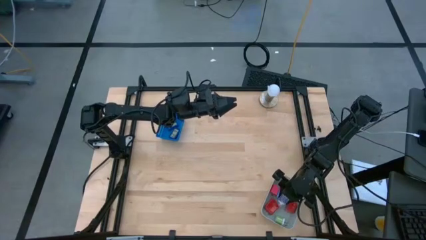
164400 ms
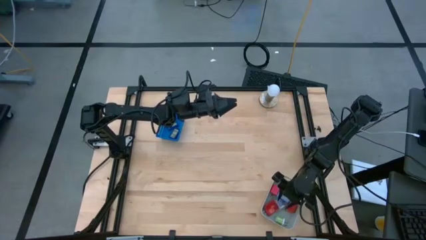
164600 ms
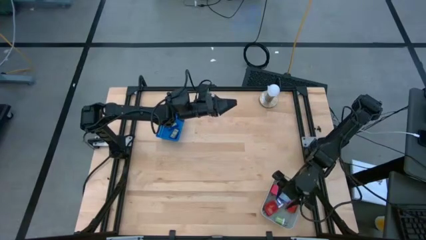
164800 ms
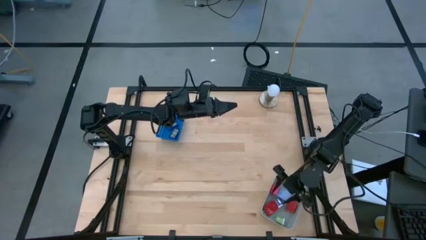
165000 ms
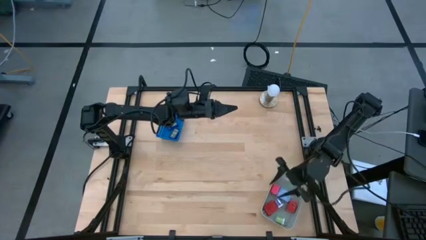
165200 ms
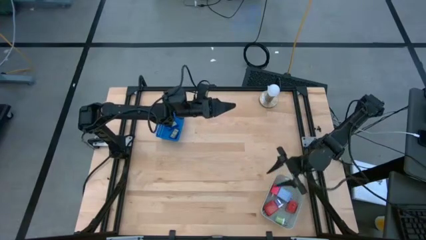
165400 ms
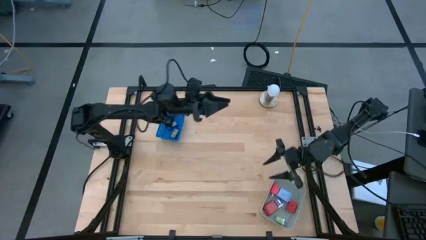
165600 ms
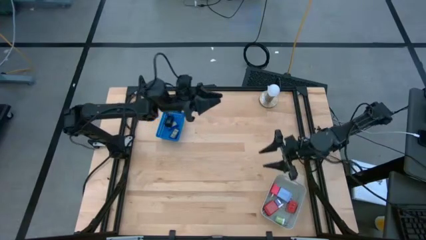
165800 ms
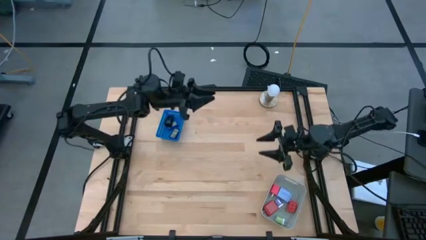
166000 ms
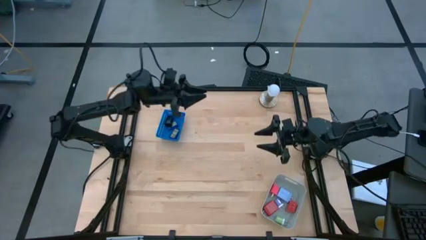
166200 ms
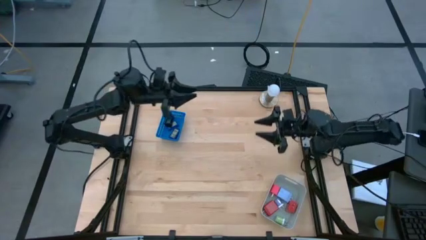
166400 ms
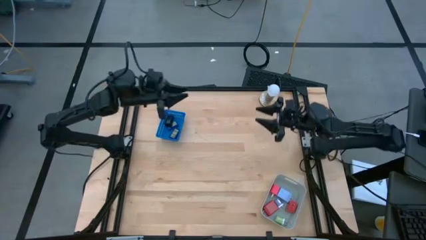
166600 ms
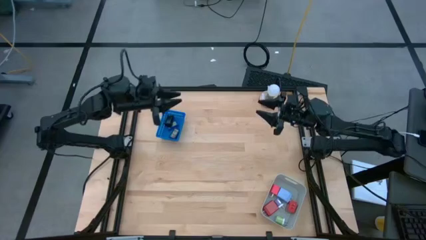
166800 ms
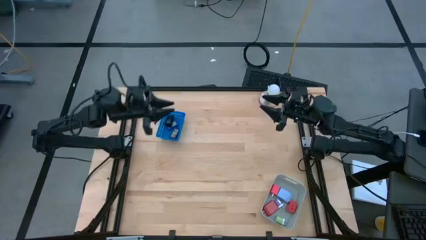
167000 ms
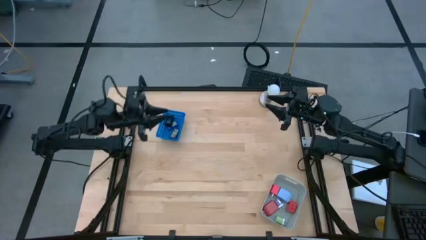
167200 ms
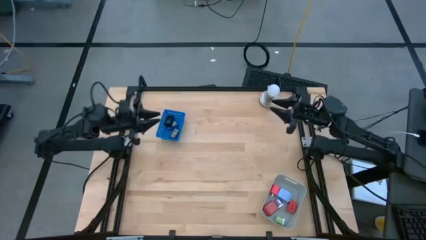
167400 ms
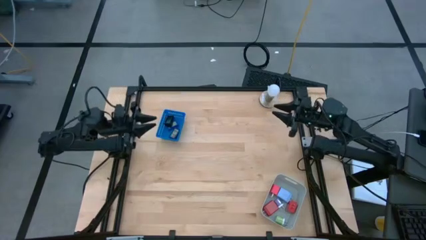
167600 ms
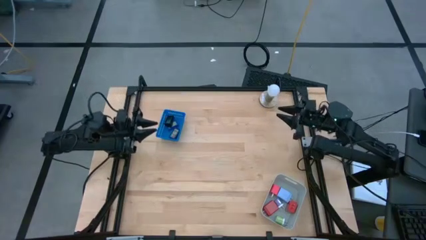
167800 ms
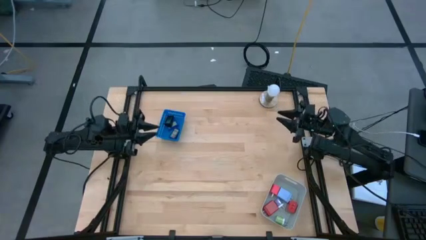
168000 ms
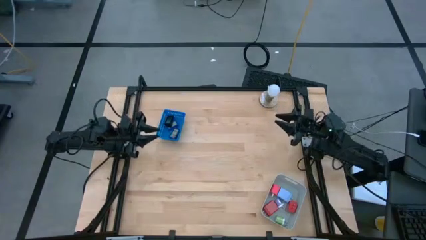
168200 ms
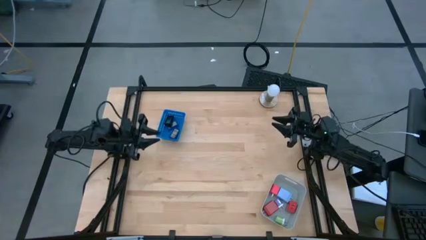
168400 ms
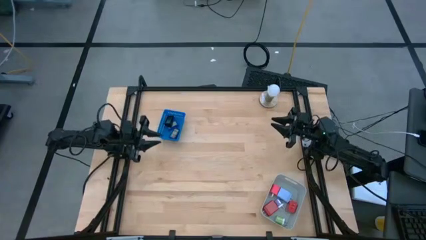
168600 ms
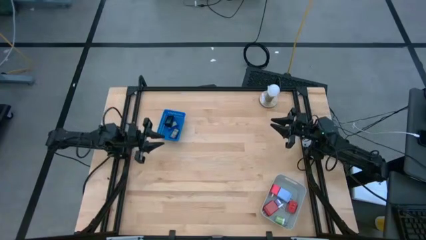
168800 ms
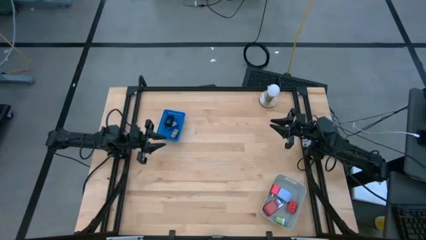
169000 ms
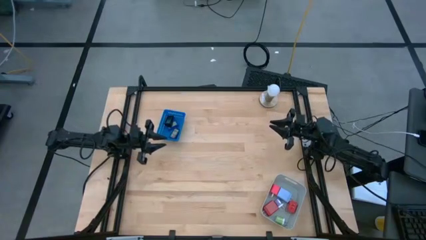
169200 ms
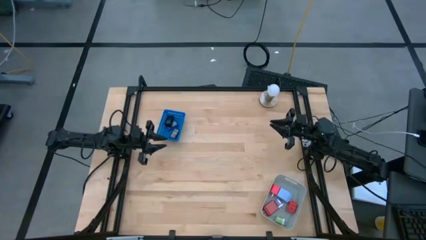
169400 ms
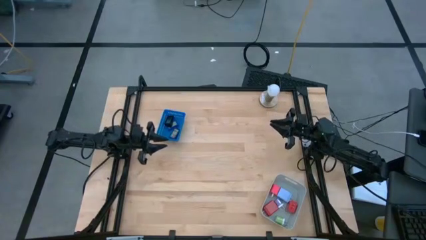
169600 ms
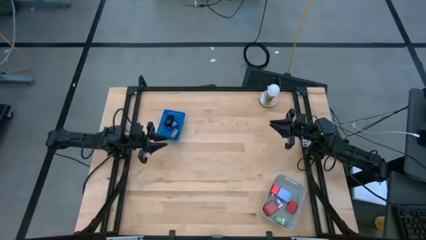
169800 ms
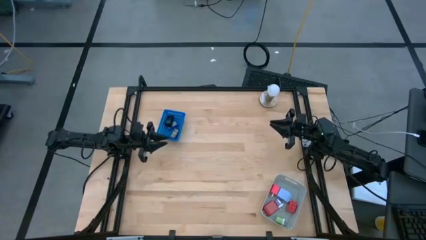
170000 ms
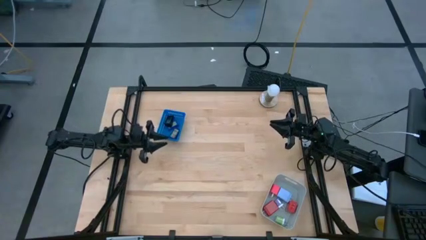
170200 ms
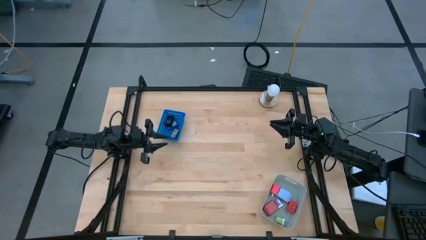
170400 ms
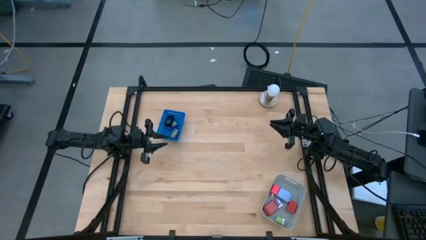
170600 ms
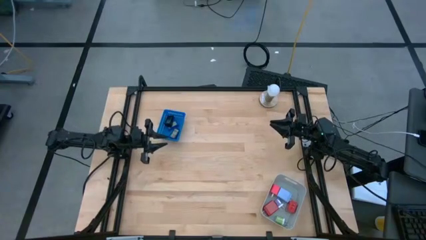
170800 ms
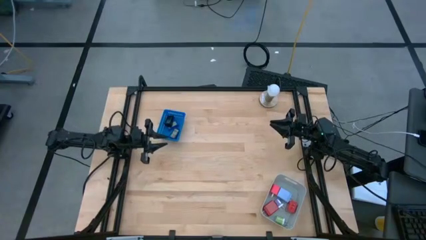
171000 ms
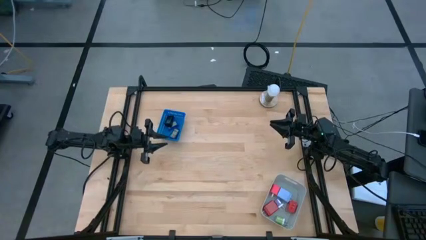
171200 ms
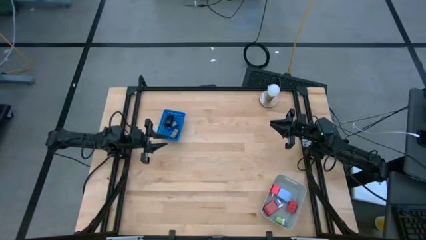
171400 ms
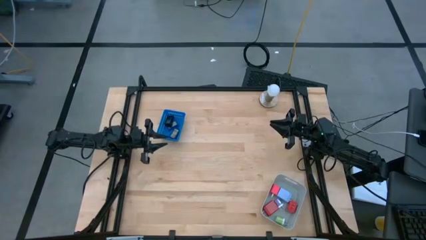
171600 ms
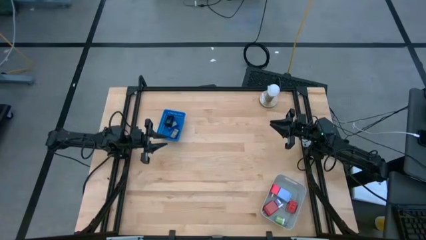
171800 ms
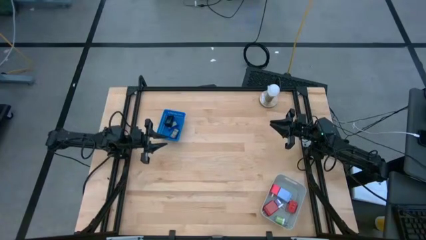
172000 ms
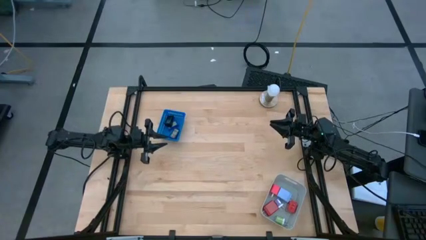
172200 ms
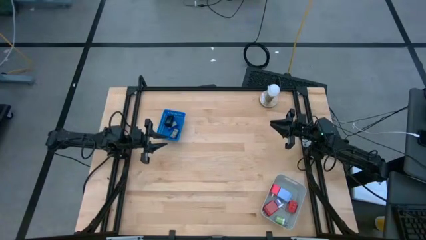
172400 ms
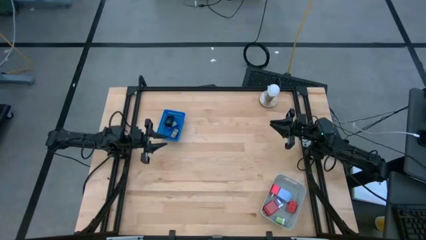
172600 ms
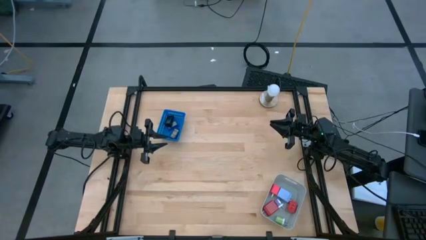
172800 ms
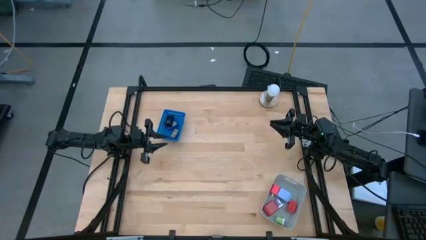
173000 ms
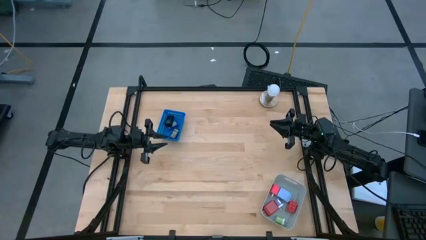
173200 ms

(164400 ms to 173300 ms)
Task: Pick & Place Office items
Return to Home Position

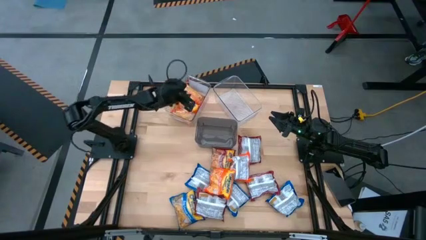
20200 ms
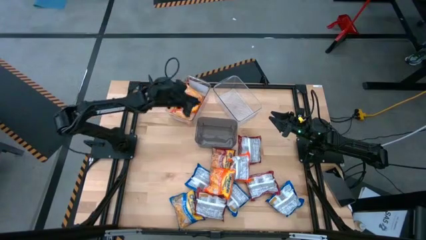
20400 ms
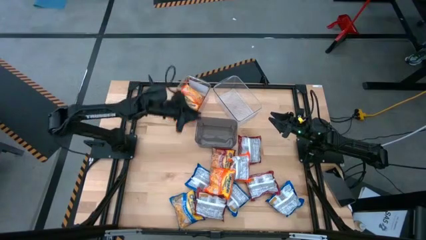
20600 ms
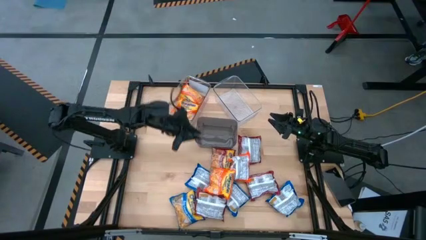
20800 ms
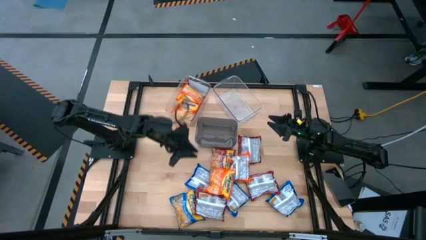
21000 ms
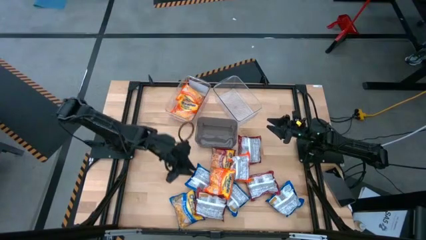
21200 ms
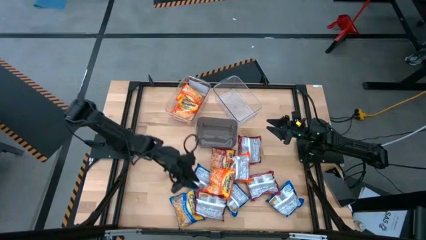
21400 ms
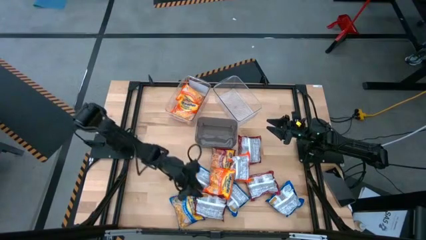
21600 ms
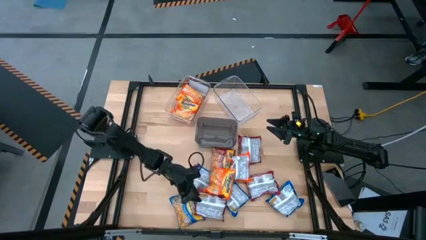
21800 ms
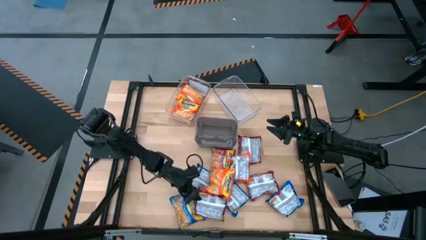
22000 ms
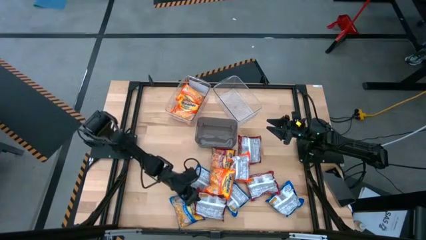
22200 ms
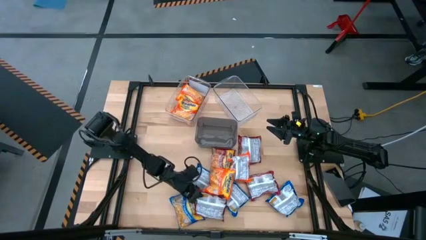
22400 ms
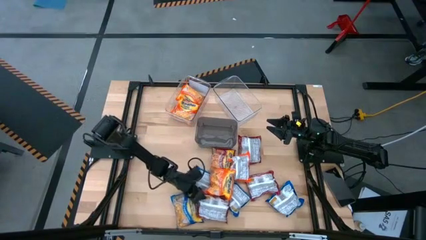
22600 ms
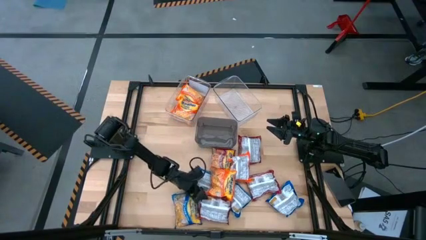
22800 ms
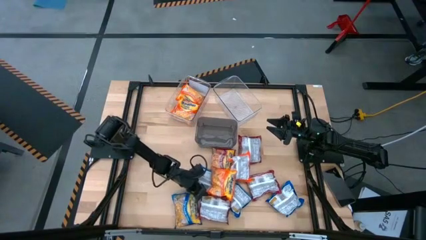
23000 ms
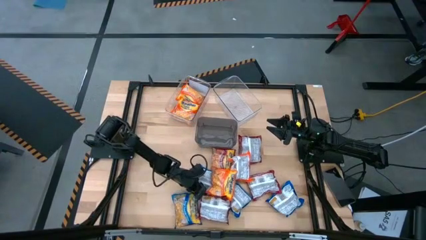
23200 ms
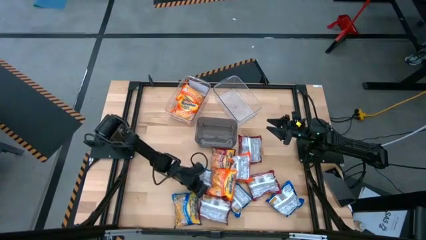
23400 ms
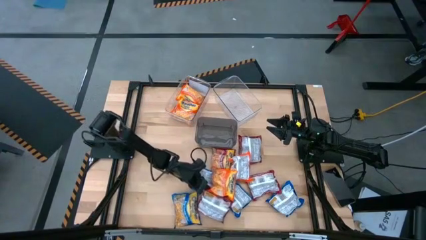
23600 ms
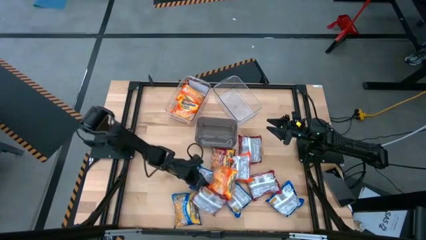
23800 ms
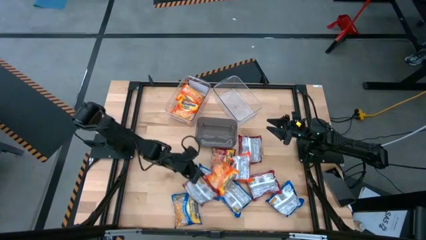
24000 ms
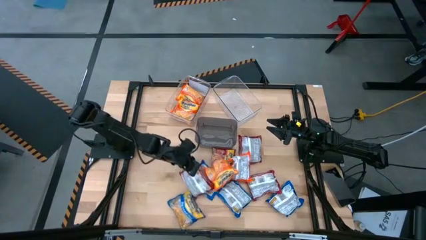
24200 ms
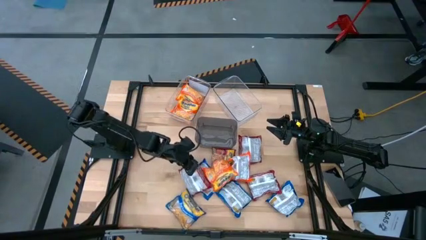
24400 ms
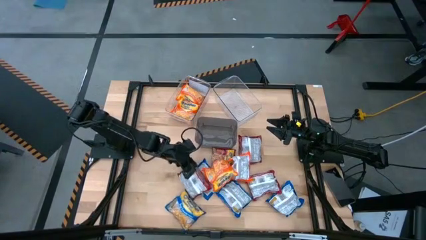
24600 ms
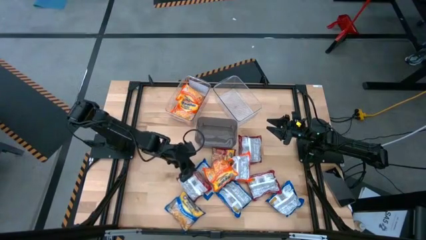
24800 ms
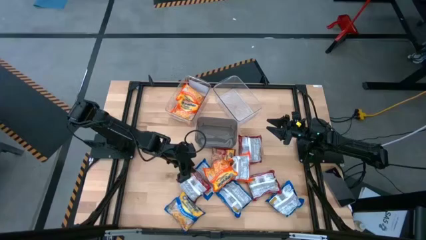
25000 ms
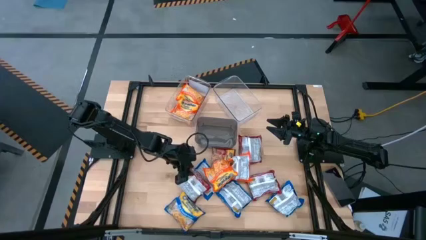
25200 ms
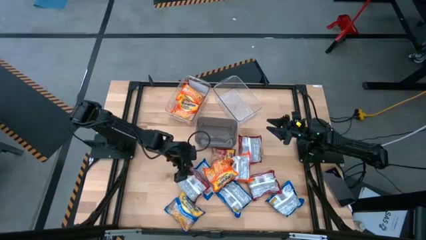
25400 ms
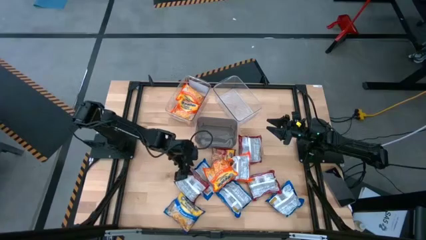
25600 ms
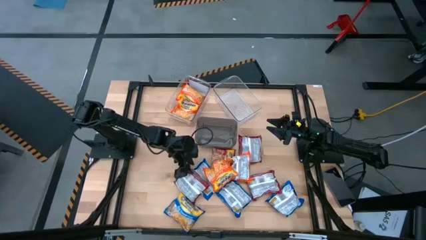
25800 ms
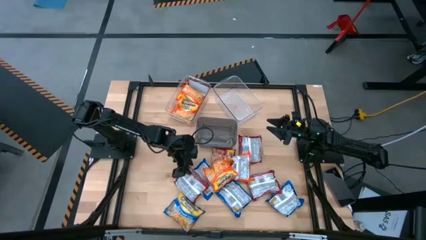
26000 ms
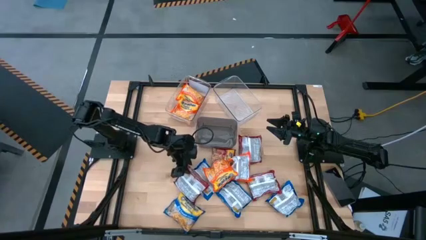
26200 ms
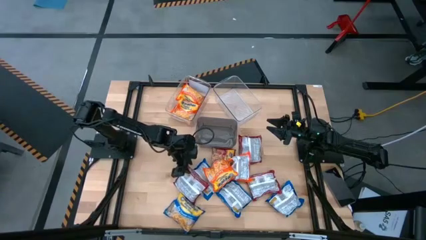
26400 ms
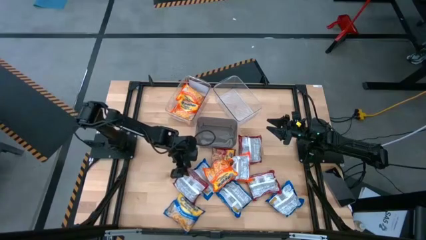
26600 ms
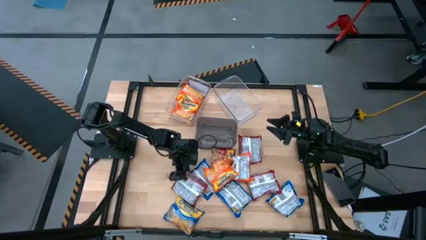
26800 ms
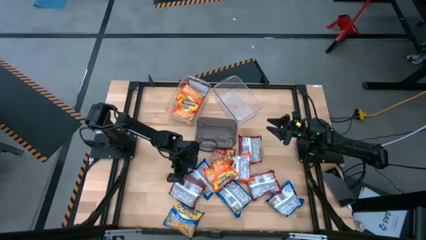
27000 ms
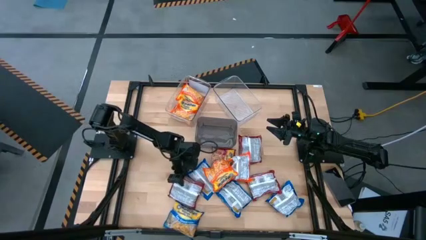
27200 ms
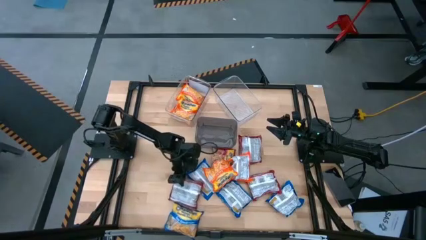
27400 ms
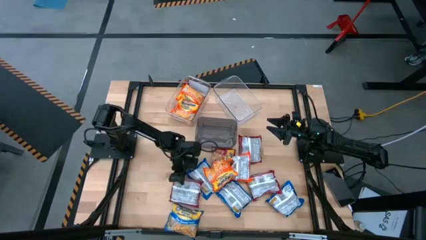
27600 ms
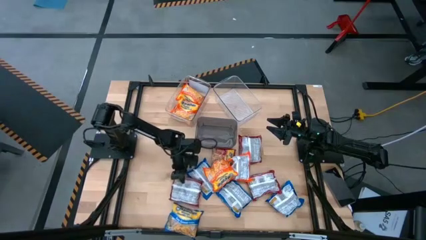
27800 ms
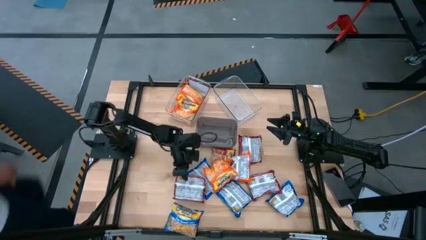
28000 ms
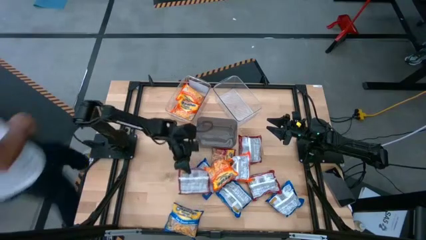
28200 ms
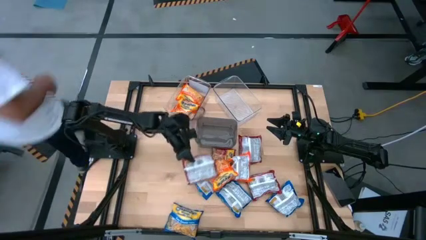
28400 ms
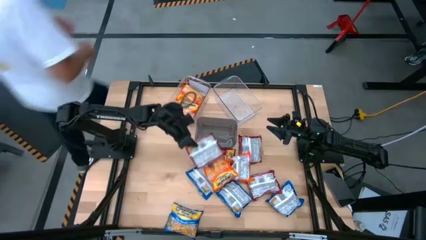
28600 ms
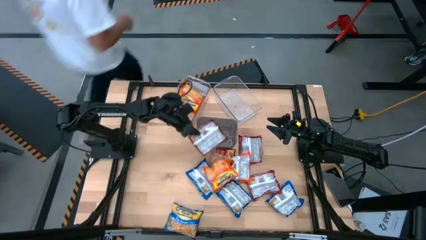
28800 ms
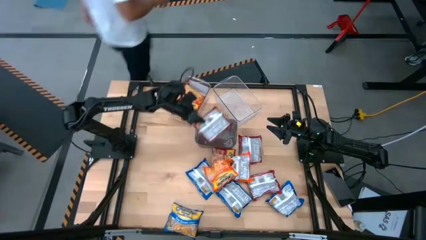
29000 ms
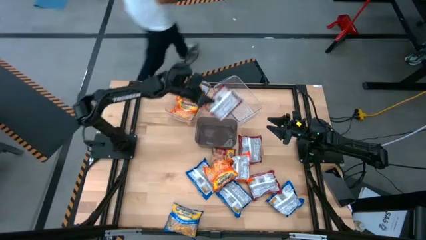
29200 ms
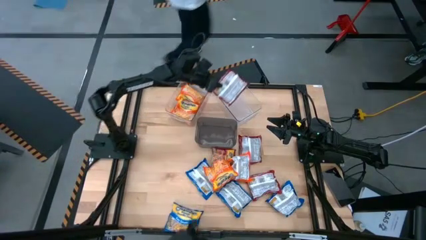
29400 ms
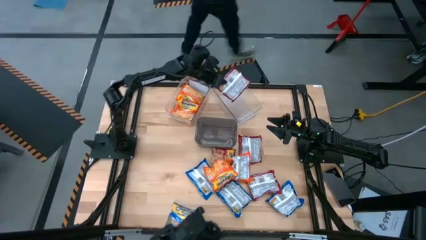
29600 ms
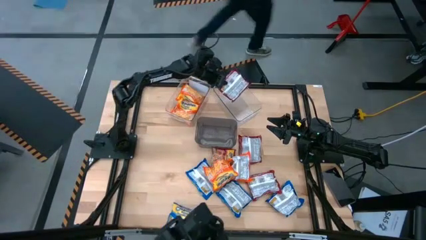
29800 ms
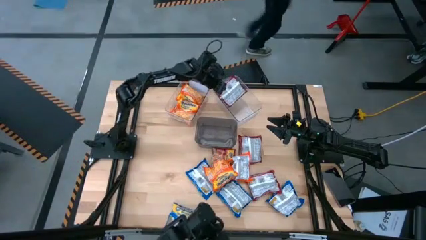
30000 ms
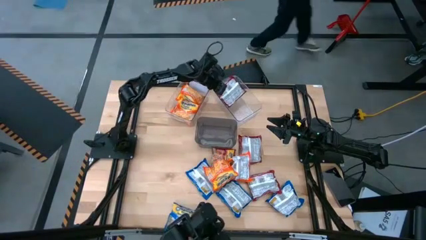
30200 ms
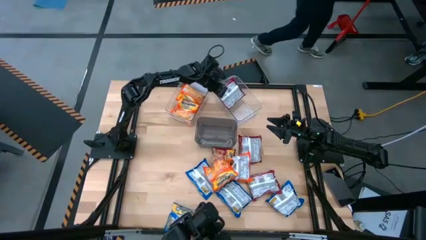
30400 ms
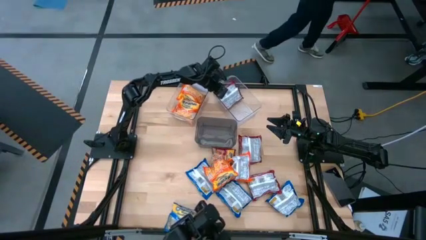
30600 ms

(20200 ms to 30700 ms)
Task: Sort Maruchan noodles
Put the red noodle pack into the right transparent bin
